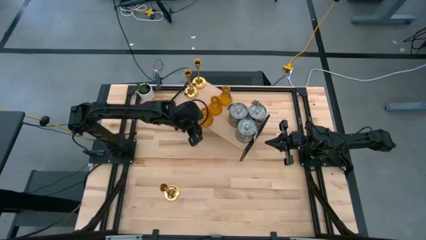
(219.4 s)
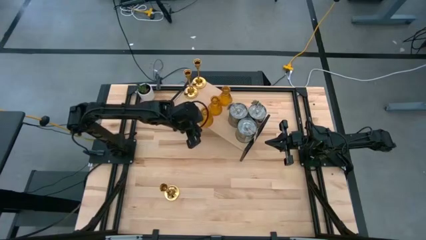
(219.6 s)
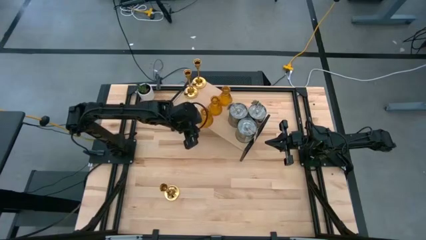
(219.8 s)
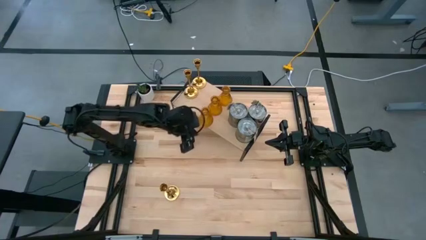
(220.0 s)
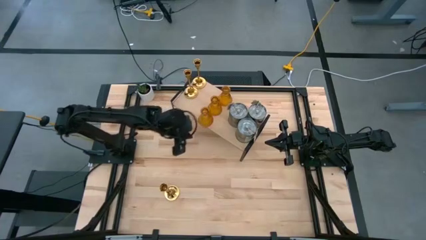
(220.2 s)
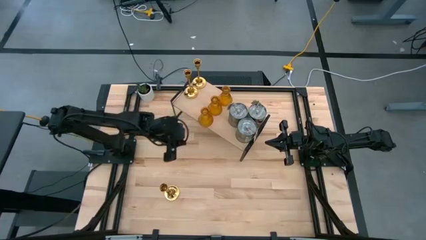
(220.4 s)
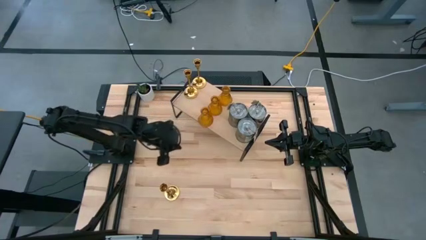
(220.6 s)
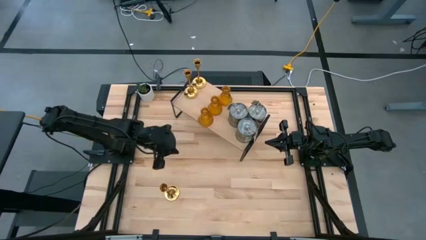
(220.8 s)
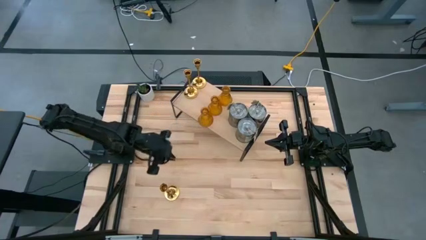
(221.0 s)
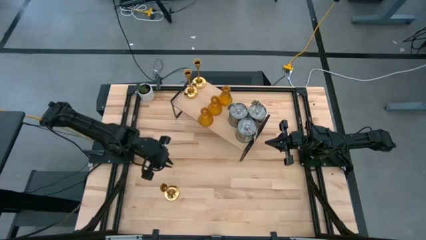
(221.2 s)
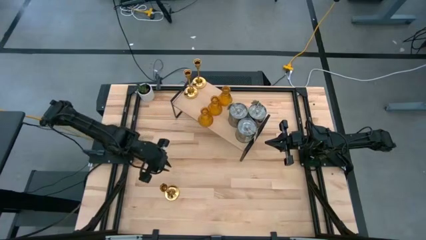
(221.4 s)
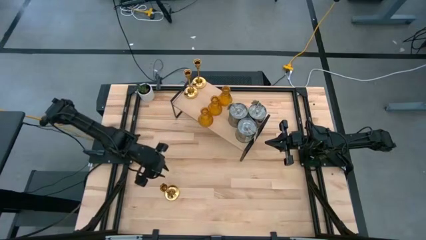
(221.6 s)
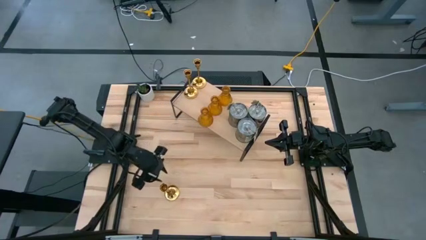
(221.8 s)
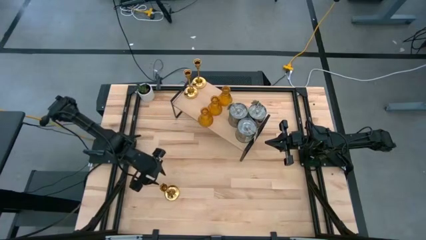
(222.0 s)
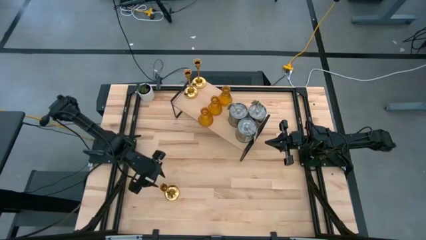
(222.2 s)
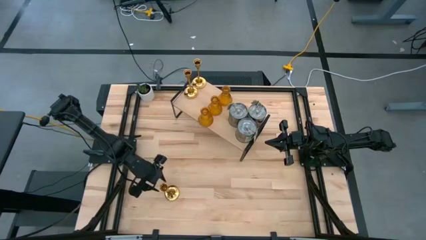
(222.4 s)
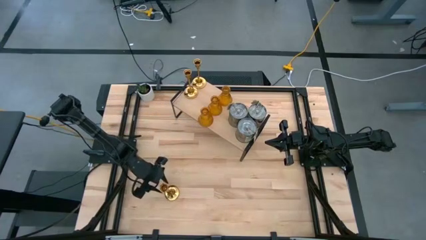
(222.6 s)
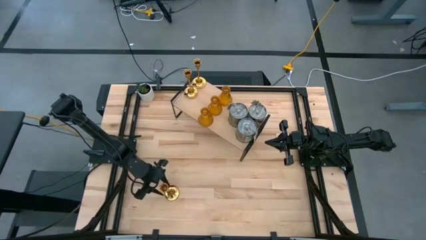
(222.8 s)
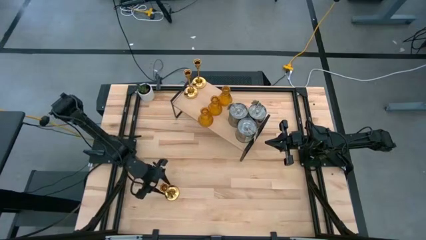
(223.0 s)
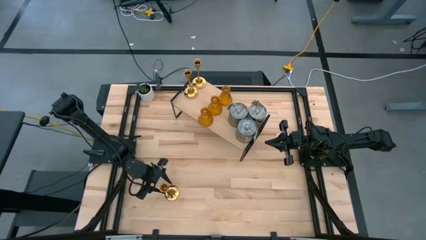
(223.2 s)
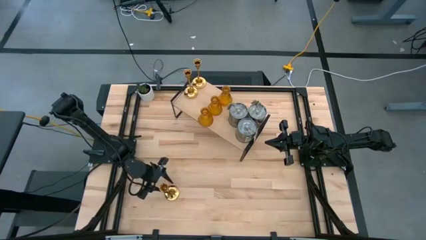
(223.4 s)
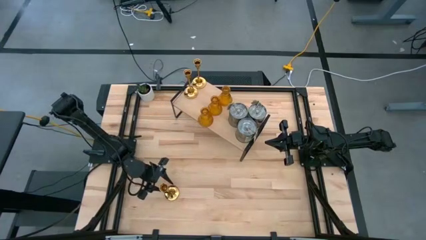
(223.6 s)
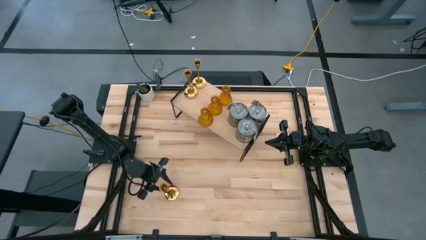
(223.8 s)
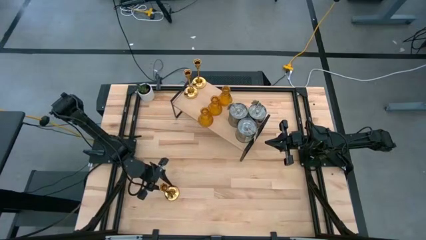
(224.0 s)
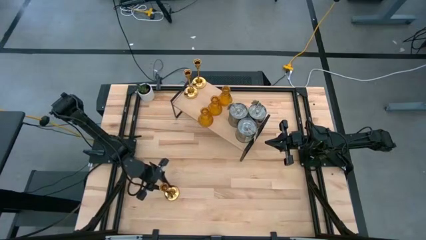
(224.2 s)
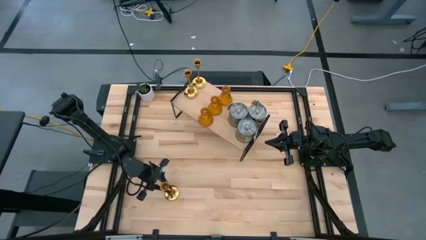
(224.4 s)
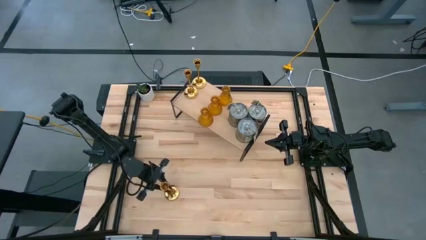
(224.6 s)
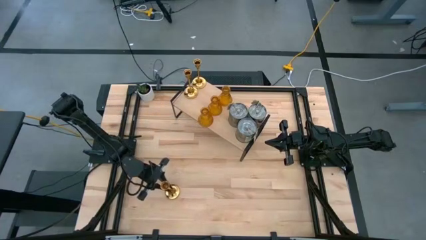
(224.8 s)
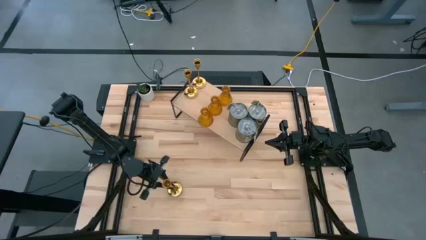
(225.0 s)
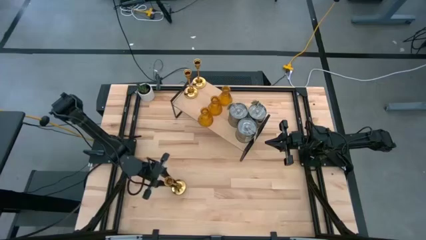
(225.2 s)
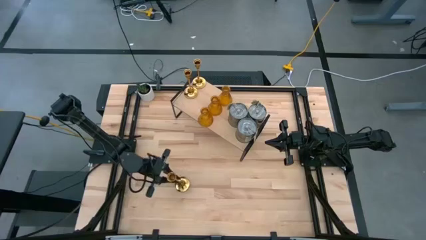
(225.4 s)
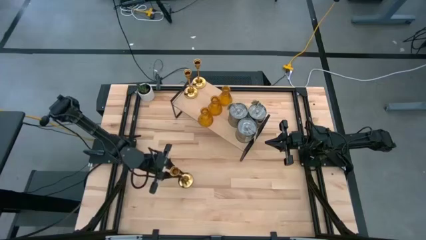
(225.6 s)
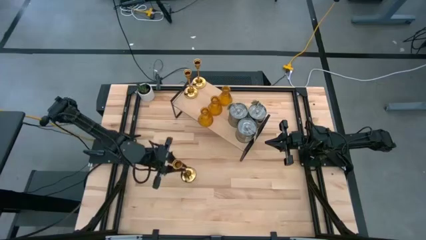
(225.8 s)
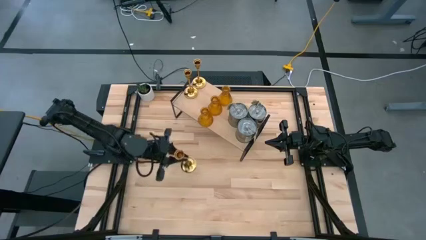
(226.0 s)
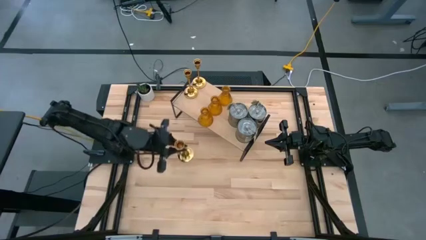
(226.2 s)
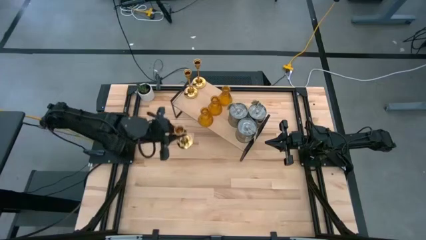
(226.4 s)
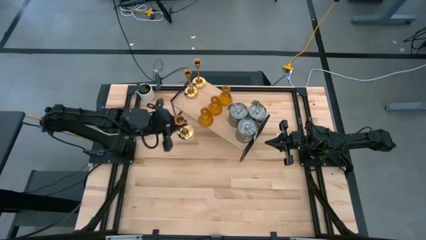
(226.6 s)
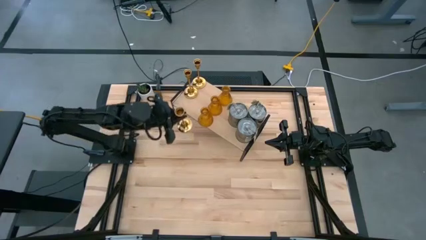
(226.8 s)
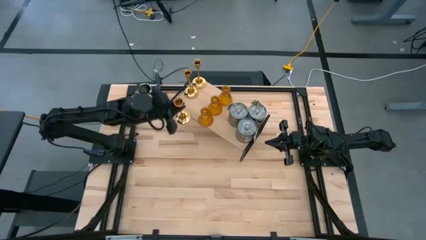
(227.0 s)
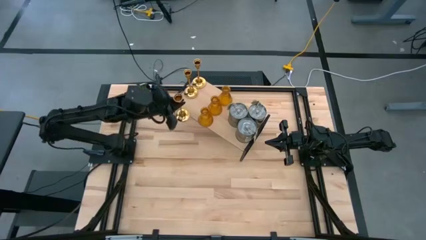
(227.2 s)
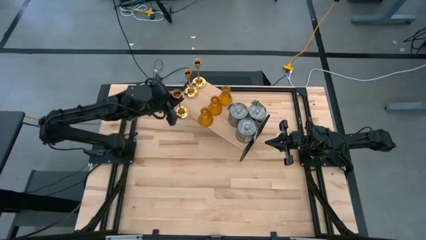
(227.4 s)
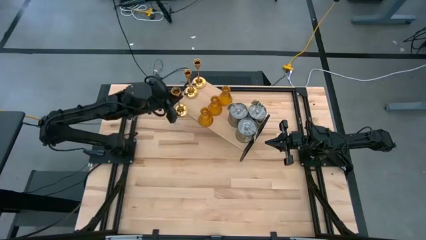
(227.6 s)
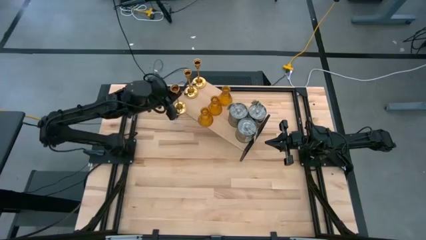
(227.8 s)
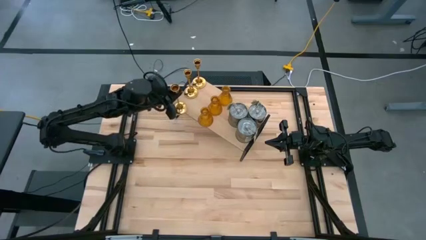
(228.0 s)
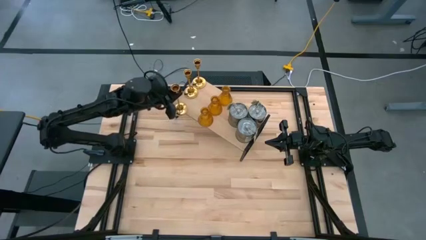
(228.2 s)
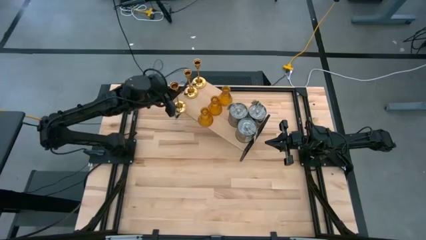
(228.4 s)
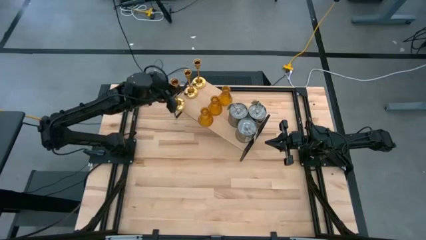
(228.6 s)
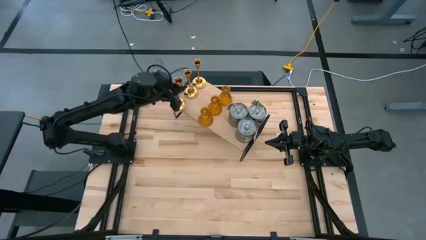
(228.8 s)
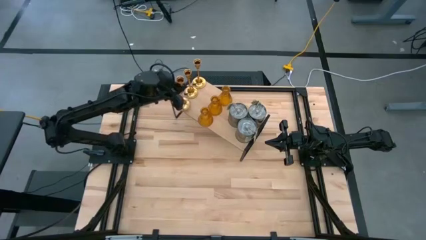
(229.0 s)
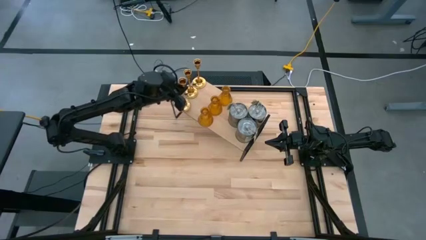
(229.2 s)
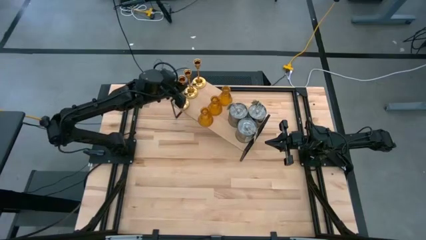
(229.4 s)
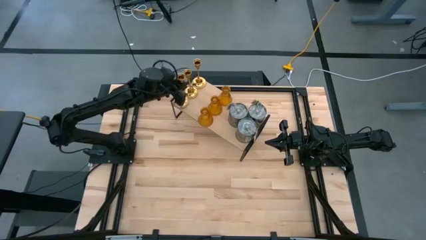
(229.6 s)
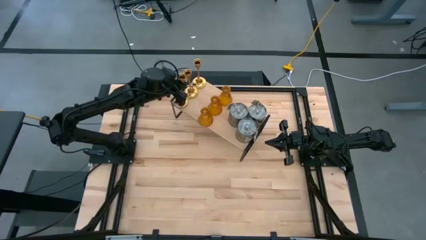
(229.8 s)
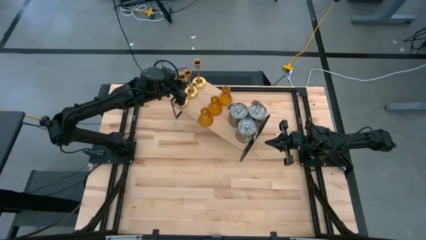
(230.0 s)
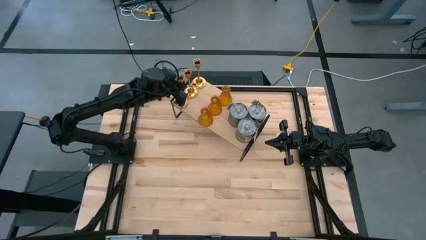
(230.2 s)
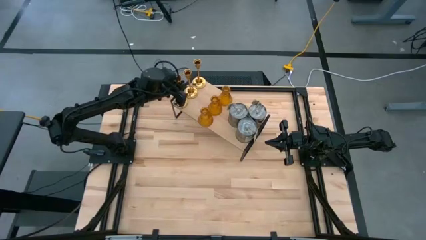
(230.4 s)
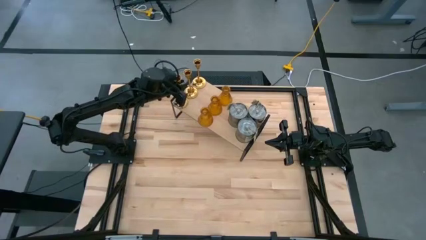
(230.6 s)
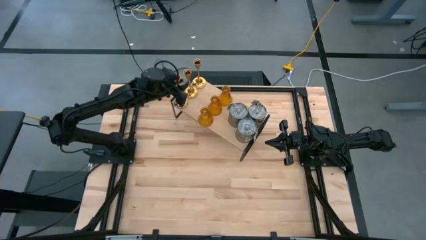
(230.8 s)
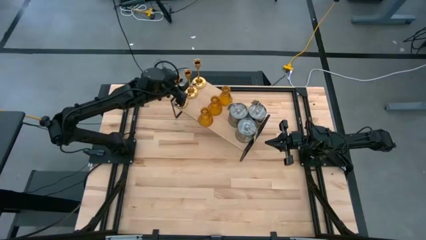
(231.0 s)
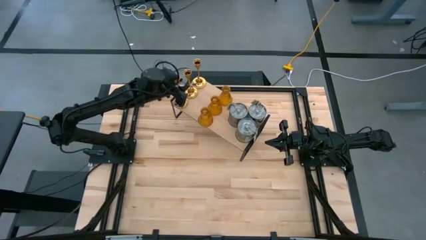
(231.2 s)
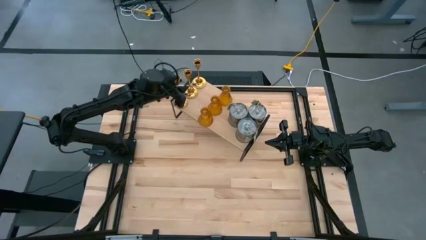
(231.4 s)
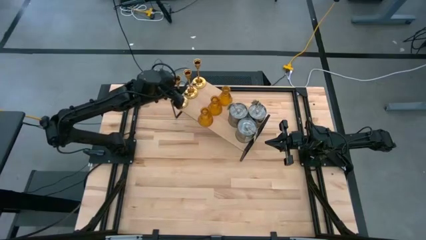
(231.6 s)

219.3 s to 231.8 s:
Task: Pick & Place candle stick holders
Put the gold candle holder on the shelf aligned with the other gold candle holders
